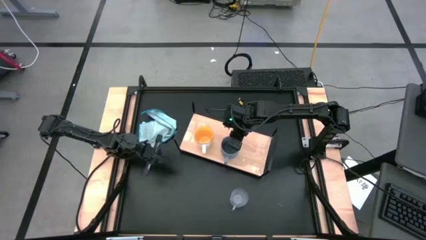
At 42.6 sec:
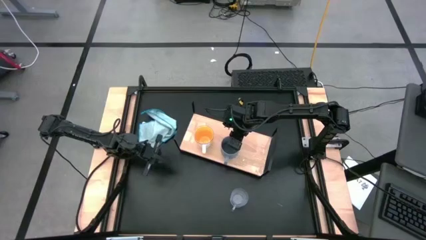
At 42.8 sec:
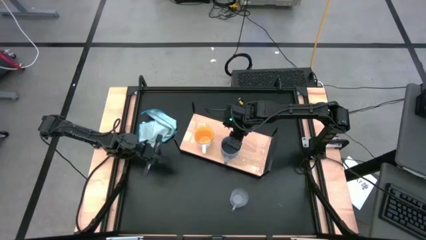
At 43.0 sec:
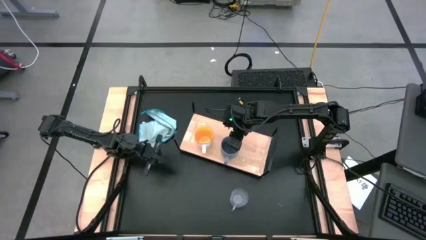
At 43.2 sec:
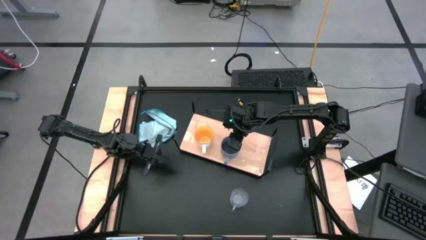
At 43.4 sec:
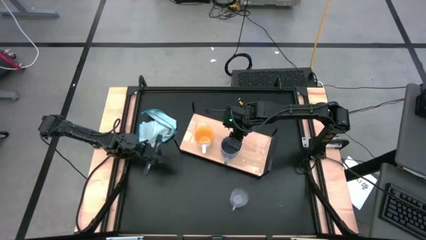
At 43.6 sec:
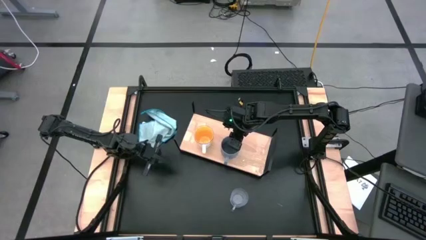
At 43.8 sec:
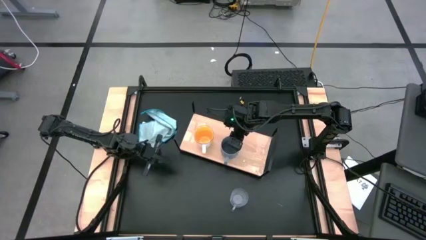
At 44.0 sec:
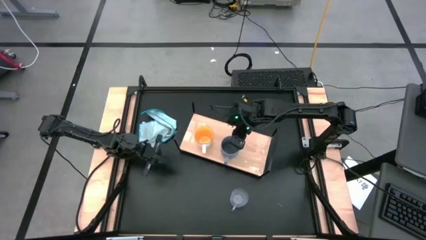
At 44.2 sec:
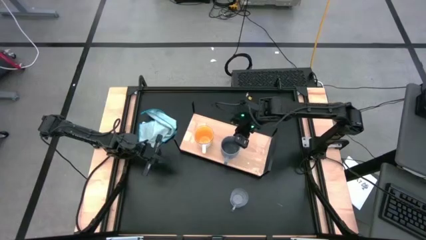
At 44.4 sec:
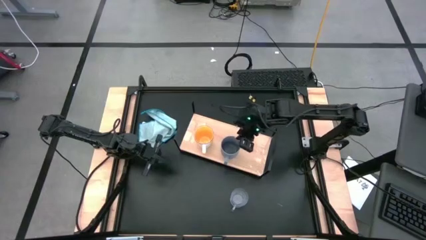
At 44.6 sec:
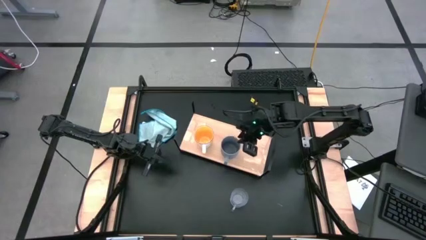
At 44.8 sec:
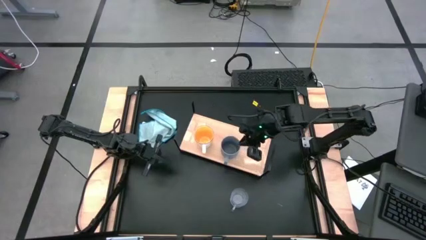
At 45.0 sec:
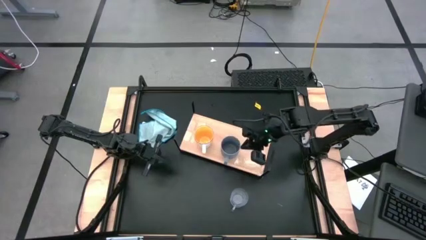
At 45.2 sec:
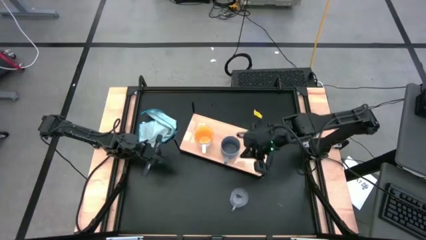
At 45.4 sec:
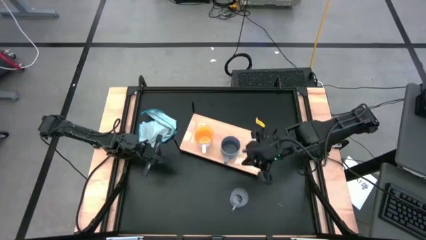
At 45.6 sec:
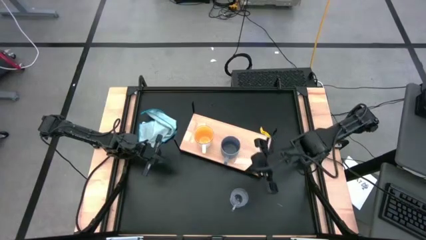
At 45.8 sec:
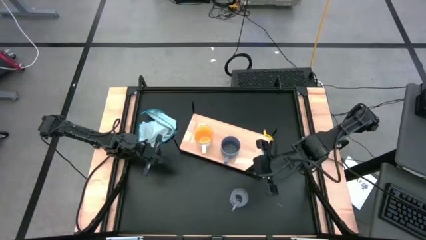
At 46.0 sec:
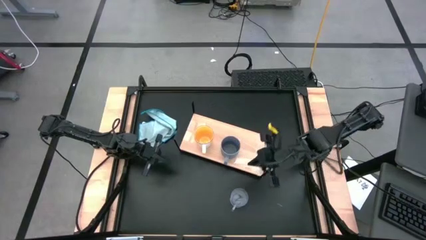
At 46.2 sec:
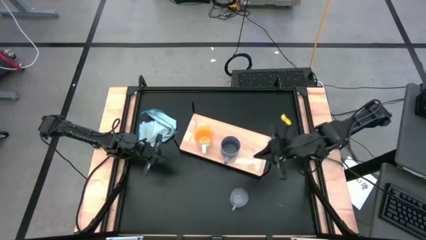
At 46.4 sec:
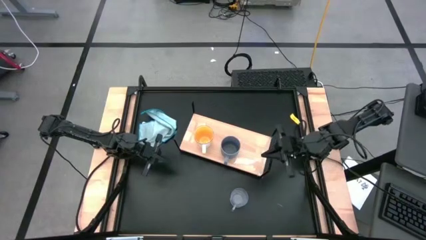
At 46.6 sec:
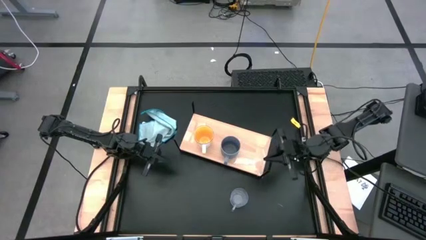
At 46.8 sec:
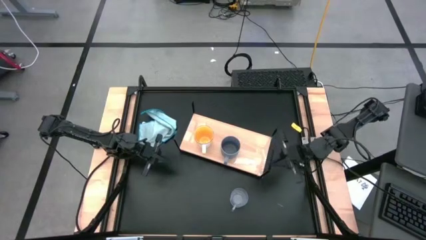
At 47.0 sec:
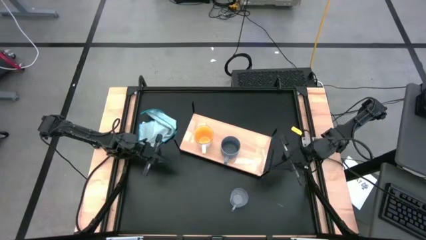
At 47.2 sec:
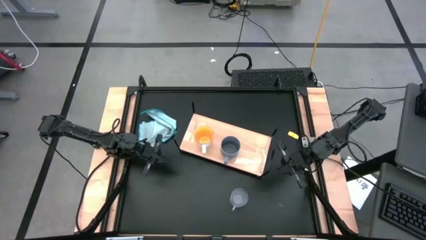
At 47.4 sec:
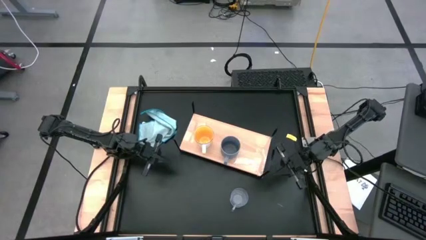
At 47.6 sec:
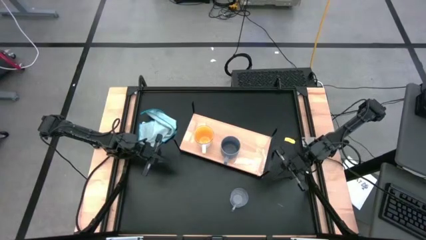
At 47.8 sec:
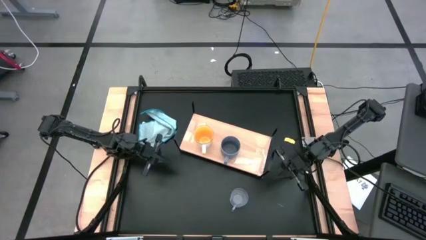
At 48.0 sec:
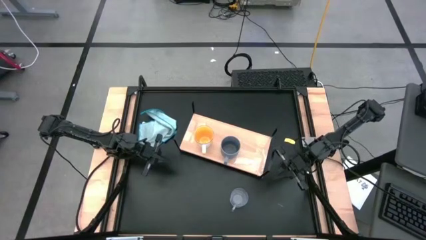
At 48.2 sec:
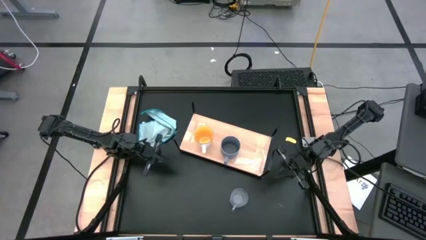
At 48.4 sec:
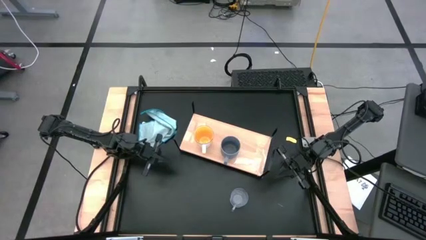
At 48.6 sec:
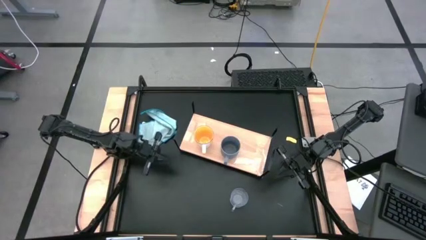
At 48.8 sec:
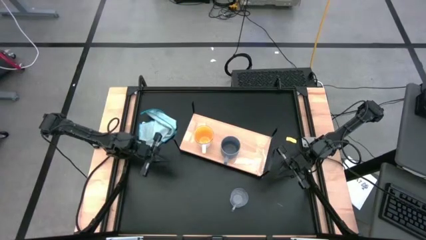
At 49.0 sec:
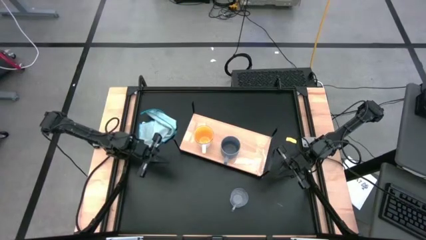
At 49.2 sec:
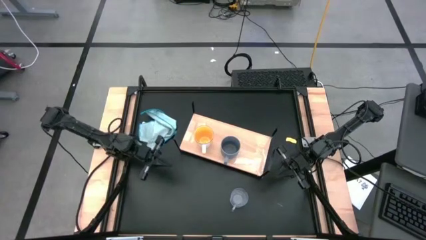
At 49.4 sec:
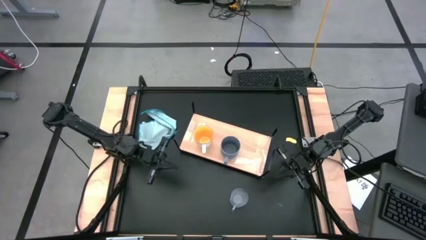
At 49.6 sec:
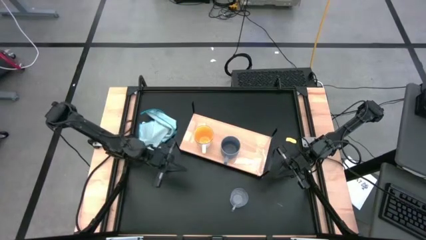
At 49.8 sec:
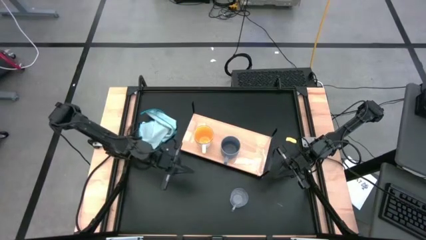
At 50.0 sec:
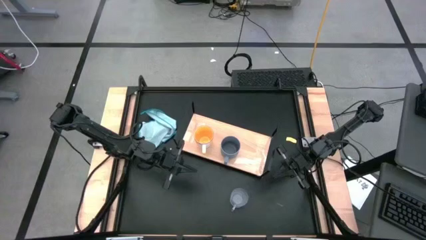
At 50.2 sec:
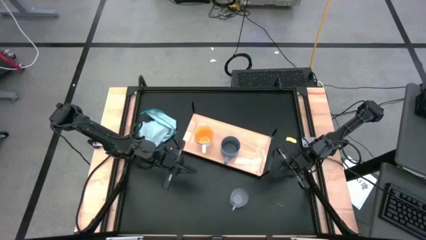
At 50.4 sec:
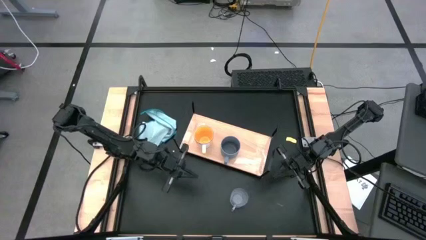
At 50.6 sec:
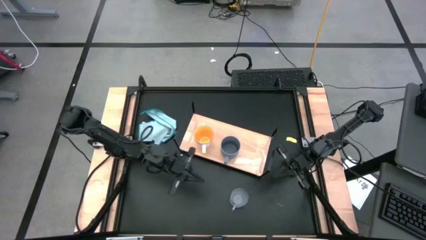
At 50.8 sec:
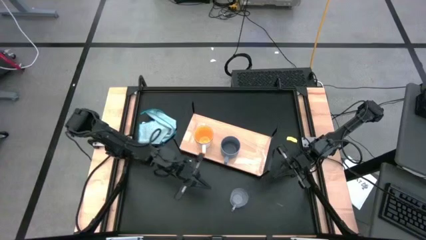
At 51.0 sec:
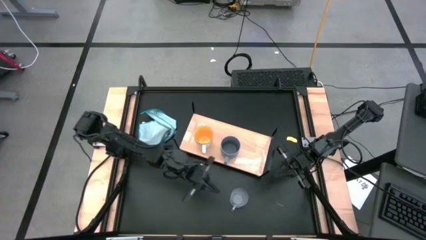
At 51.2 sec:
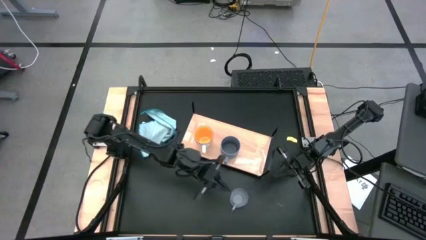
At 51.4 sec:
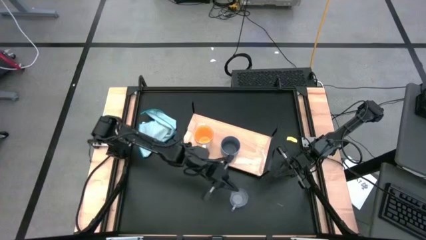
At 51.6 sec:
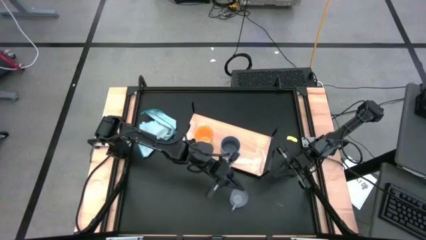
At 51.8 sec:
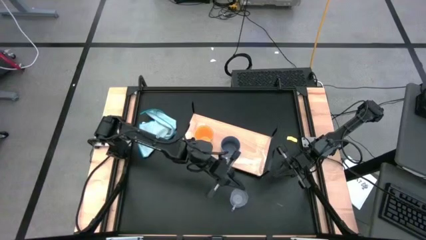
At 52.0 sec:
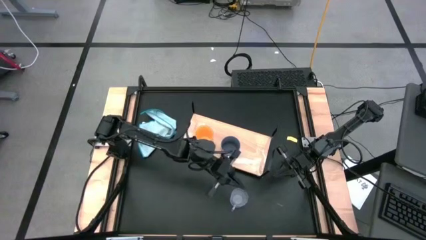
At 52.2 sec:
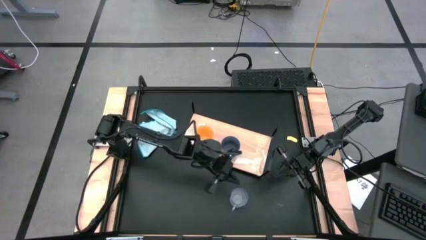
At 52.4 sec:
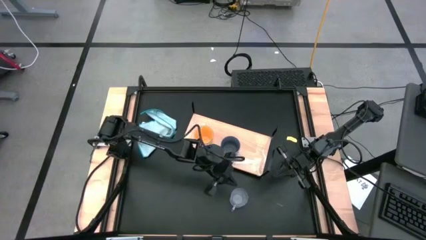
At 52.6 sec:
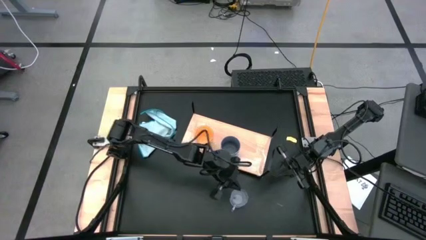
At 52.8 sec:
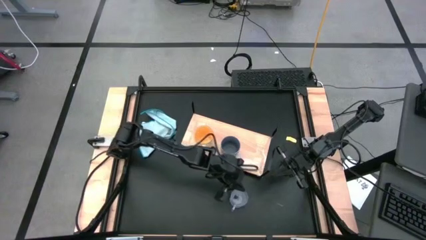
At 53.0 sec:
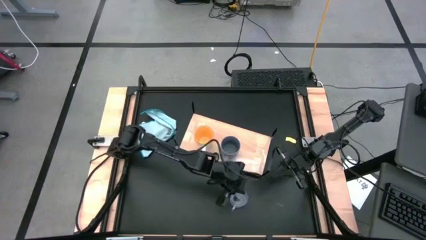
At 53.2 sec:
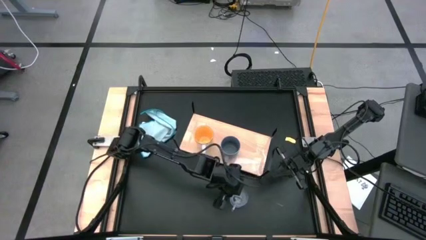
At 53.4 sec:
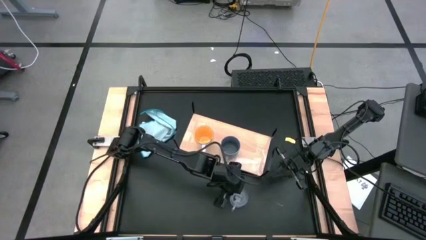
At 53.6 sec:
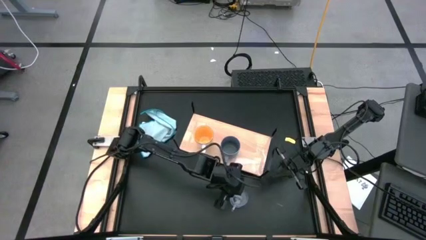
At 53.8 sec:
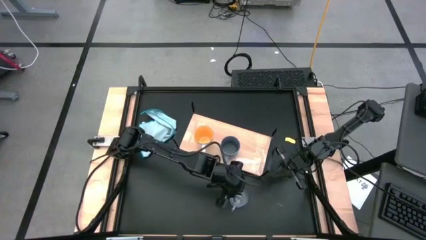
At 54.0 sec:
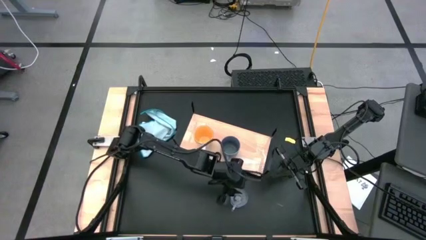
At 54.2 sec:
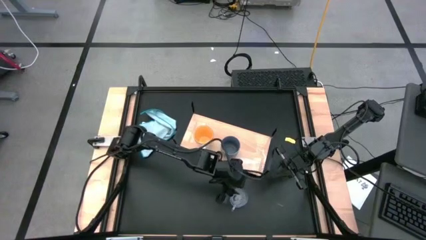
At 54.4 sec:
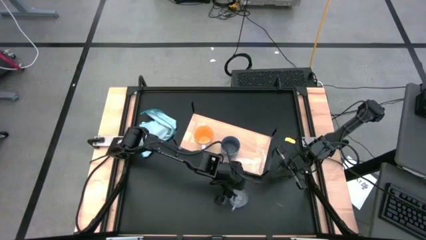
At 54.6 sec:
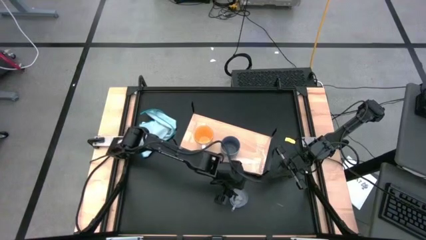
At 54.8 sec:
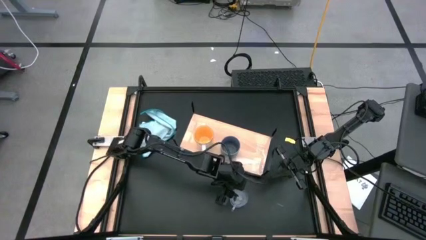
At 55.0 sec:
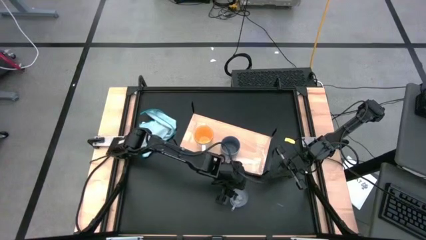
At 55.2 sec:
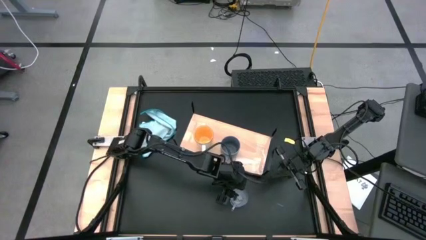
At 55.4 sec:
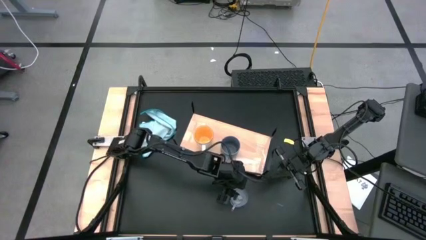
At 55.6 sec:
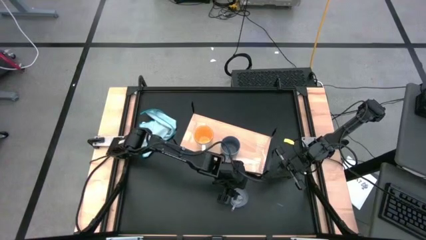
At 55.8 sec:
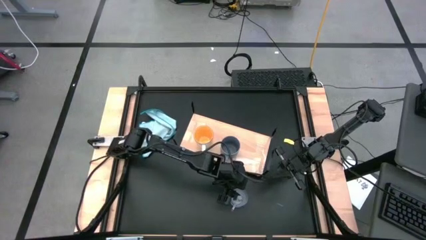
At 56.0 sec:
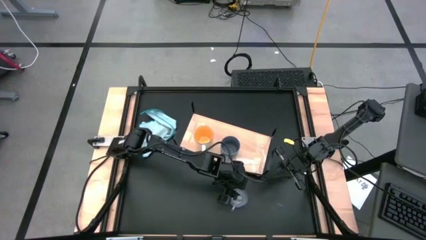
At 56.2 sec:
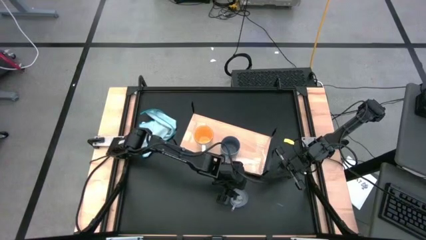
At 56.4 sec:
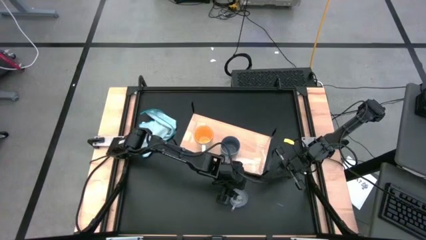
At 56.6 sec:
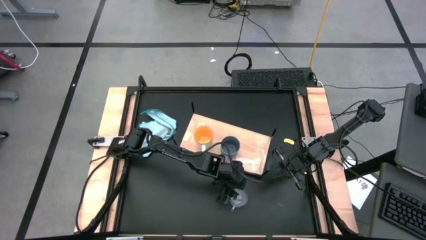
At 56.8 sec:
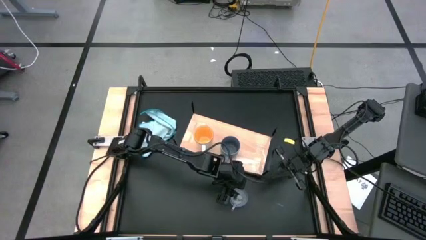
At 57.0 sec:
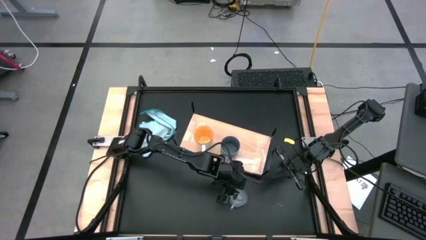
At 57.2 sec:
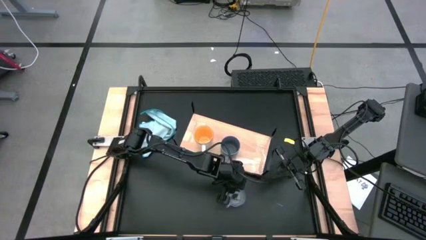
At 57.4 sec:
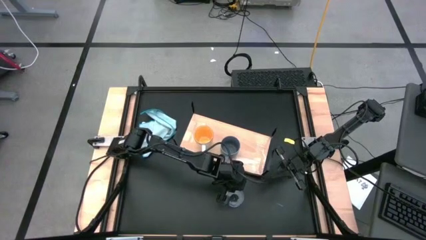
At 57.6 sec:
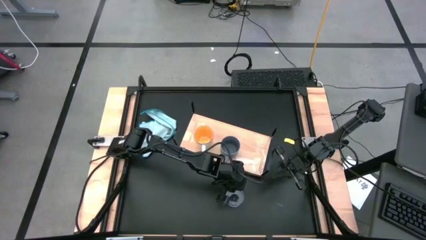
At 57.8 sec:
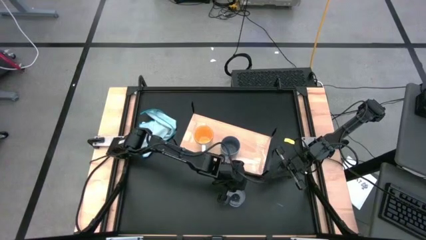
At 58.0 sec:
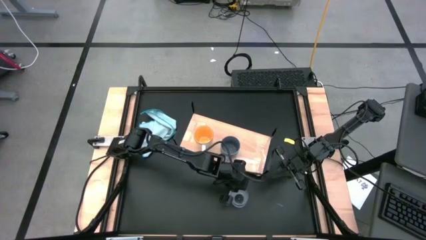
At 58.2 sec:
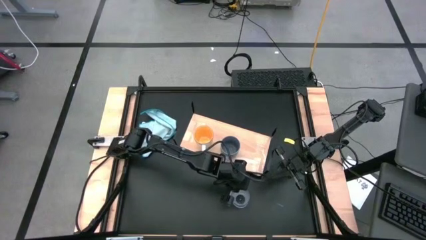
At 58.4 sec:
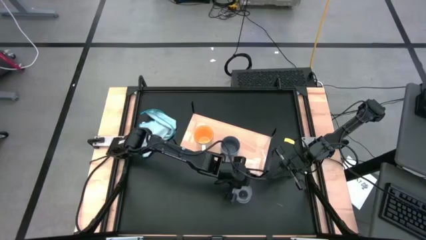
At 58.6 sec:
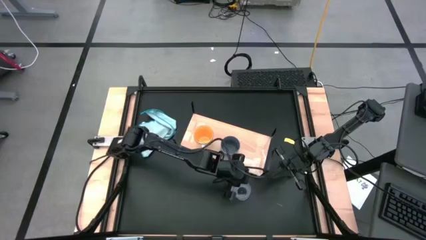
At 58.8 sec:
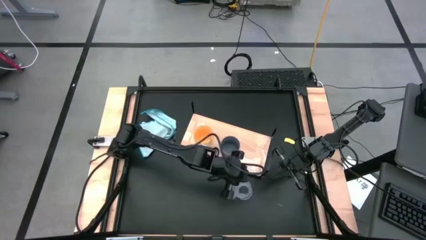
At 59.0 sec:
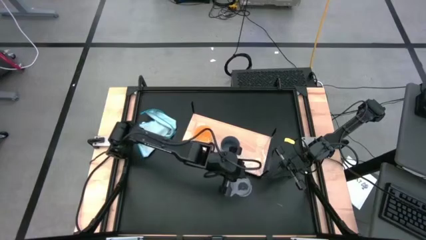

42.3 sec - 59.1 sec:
Task: Stack small to large cups/mugs on shelf
Put the transparent cup on the shelf
